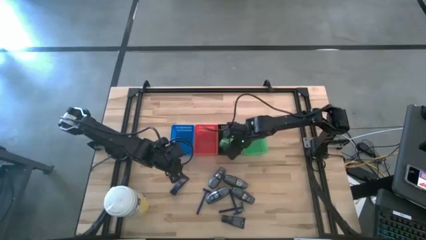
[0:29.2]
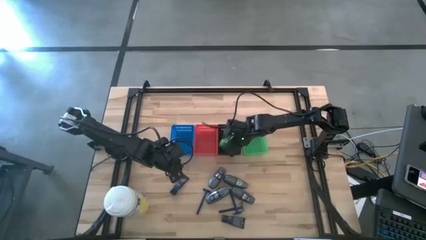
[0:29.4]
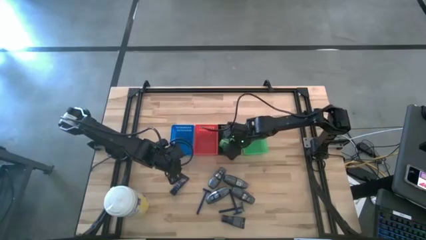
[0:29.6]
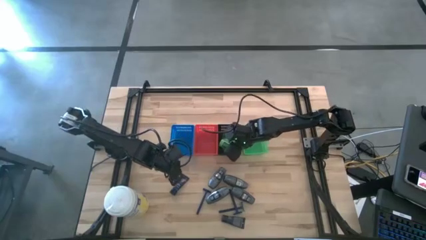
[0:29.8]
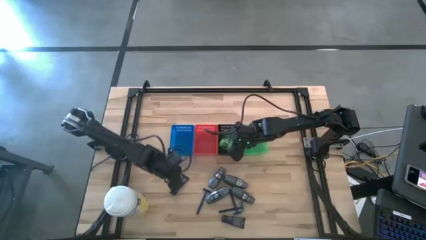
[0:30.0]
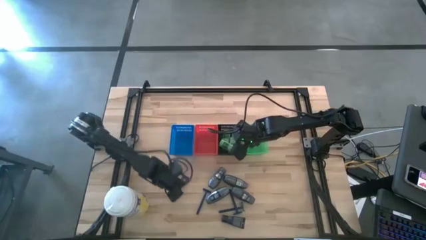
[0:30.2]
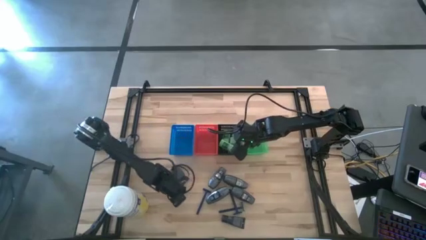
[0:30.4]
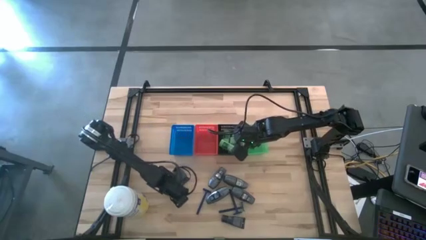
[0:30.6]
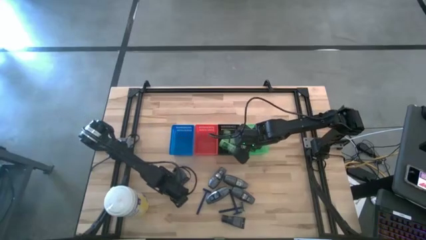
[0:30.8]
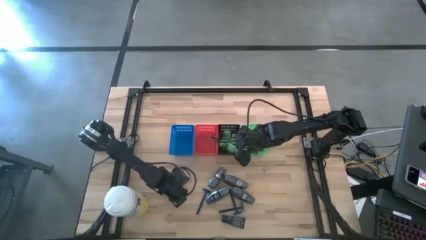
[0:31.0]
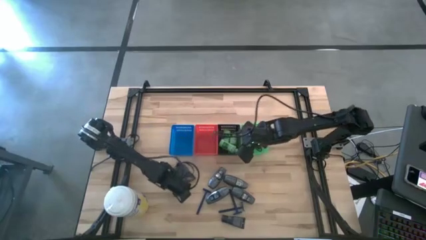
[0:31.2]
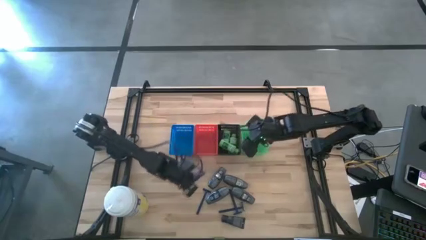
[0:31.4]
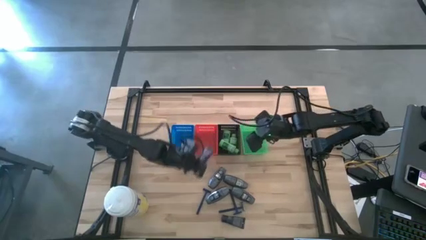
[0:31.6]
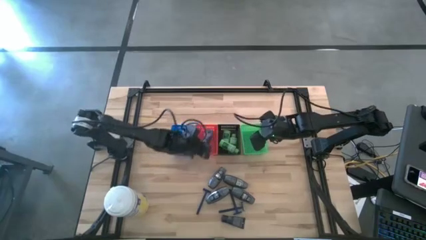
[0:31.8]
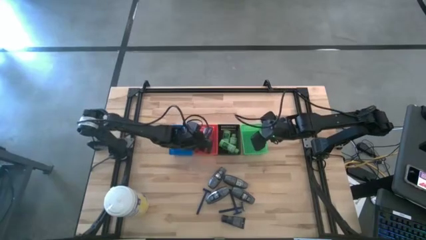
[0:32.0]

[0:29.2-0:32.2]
Task: Pick & Place Travel size toiletries
Put the shave cream into the red bin

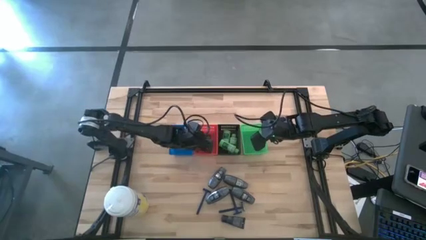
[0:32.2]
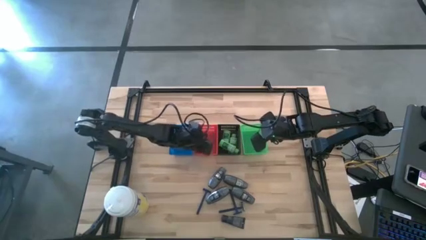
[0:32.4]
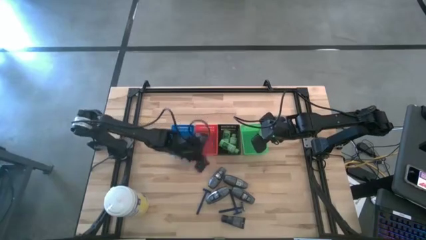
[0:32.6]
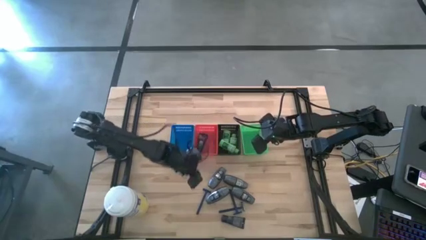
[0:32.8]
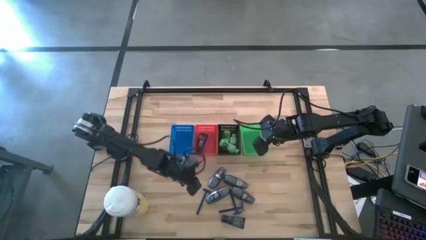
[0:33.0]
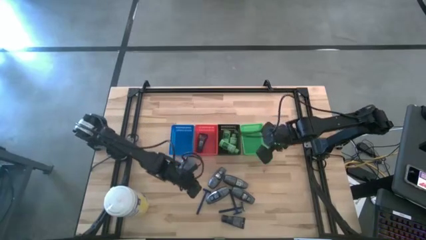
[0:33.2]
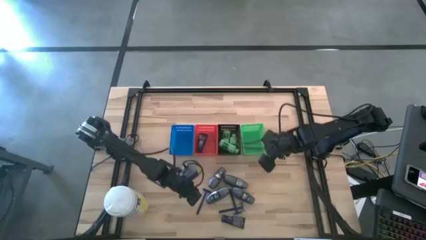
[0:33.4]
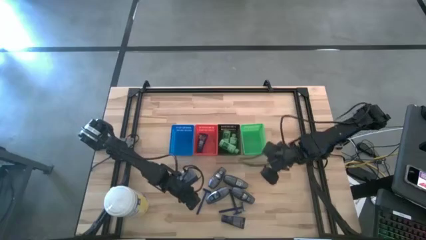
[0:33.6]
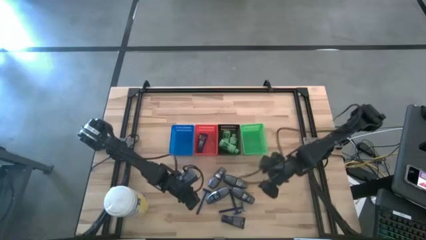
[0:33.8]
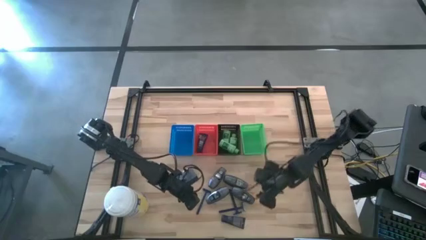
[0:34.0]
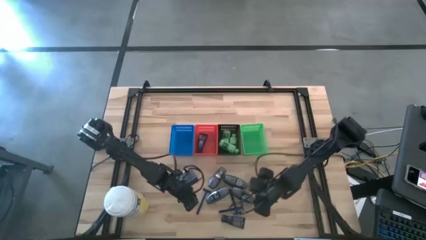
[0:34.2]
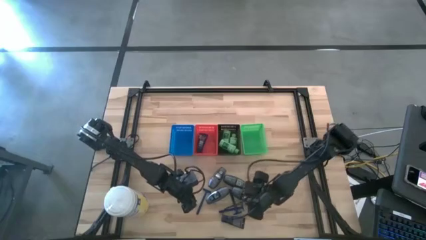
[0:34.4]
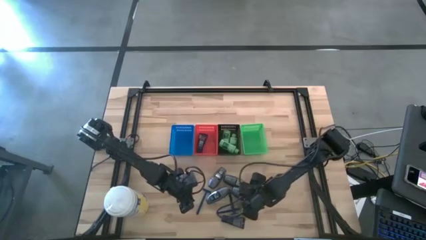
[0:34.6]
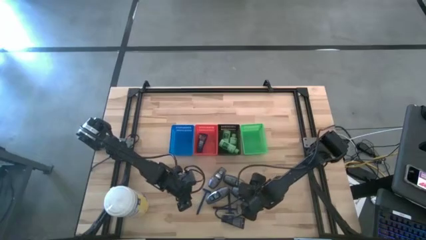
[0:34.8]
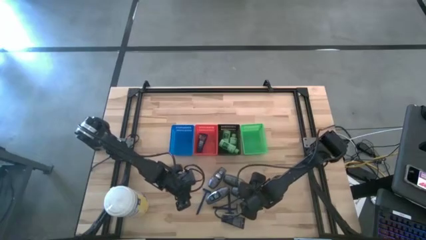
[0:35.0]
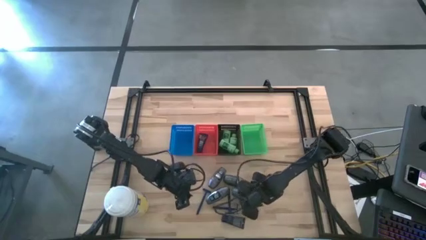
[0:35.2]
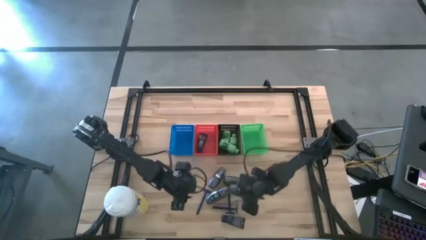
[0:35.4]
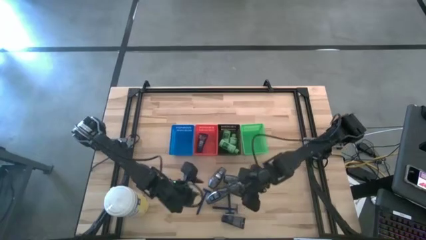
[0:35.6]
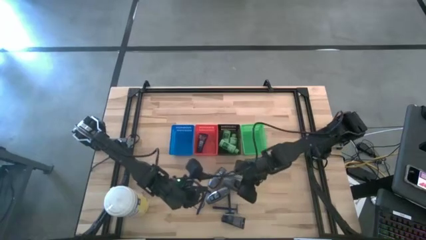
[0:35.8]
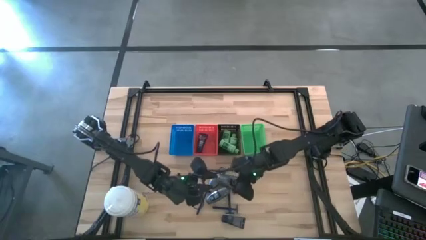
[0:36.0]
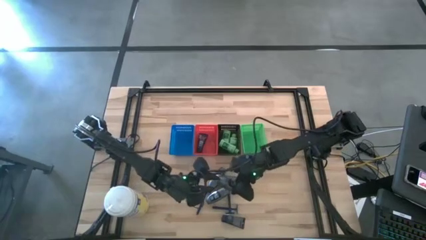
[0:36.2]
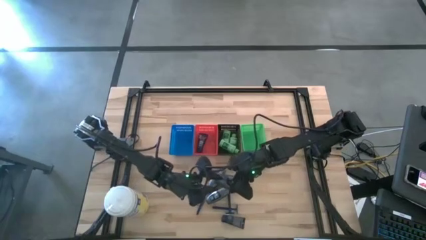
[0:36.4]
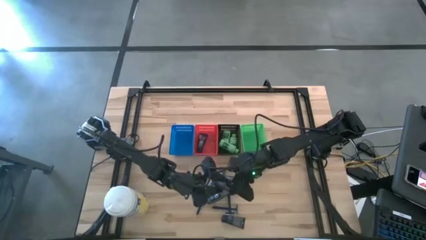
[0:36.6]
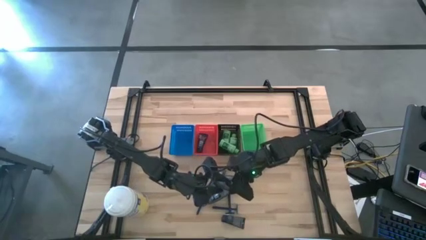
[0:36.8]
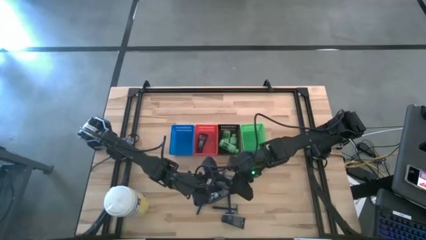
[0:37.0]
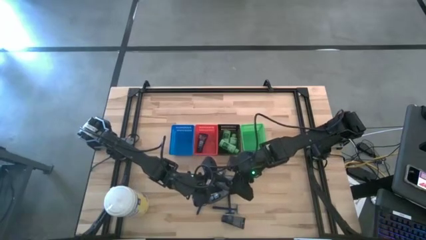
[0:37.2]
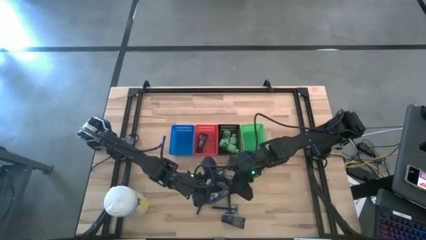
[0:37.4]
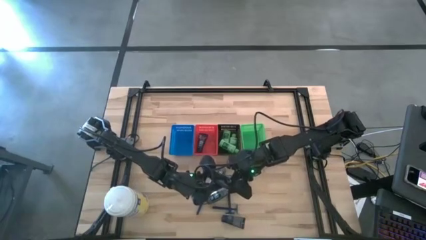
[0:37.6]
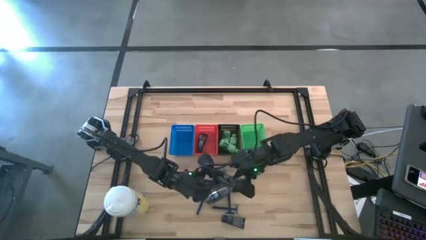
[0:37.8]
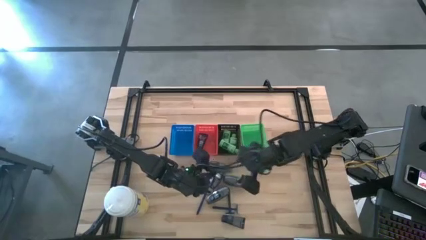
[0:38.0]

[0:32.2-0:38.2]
Put the deodorant into the blue bin

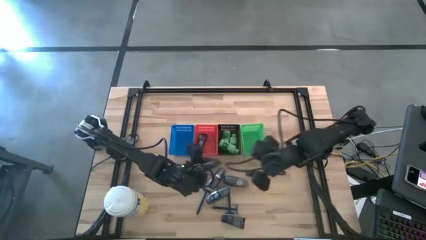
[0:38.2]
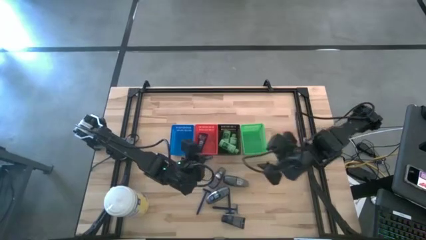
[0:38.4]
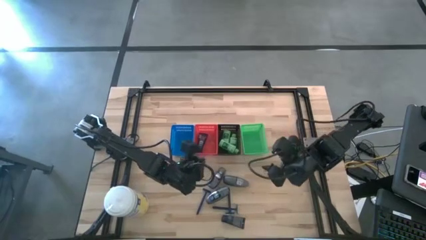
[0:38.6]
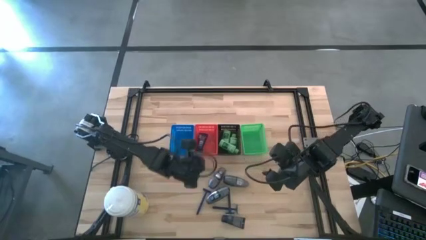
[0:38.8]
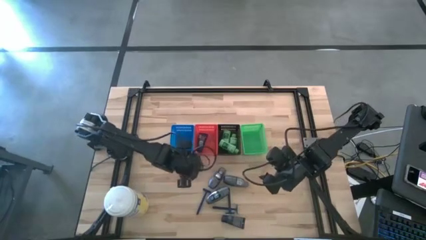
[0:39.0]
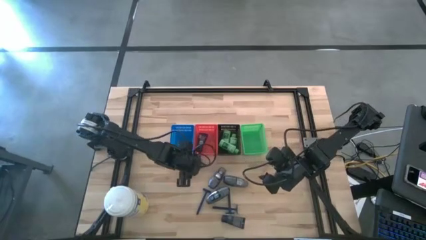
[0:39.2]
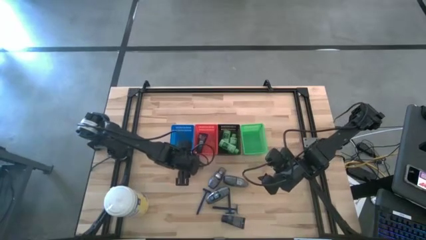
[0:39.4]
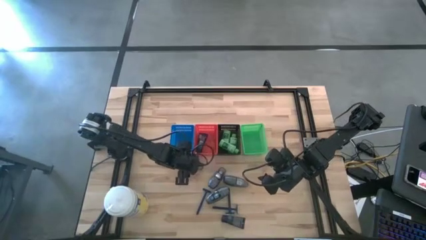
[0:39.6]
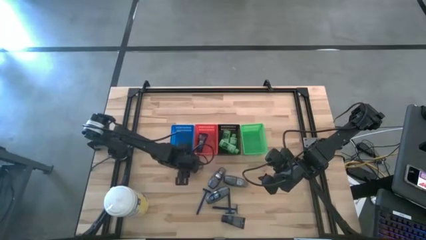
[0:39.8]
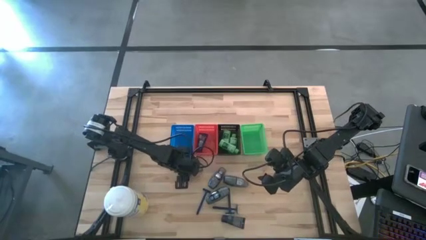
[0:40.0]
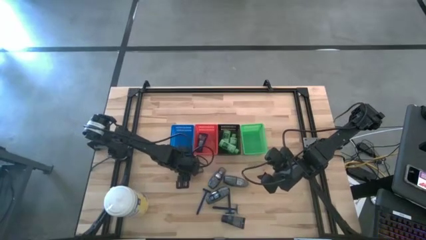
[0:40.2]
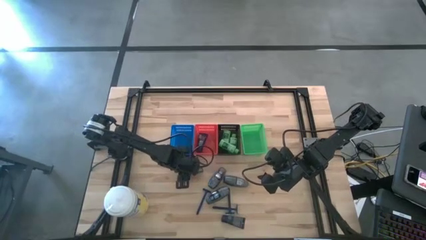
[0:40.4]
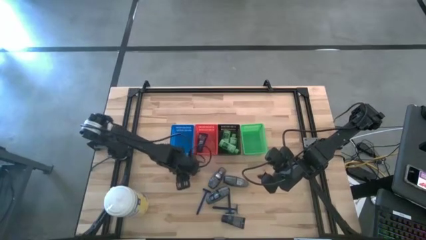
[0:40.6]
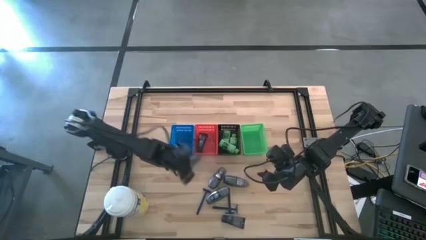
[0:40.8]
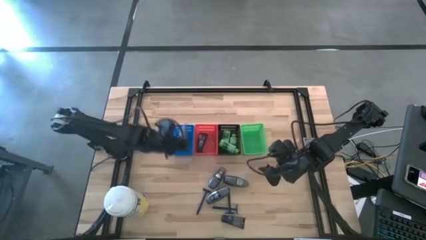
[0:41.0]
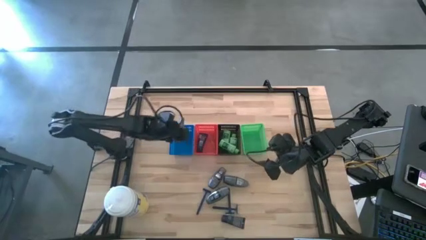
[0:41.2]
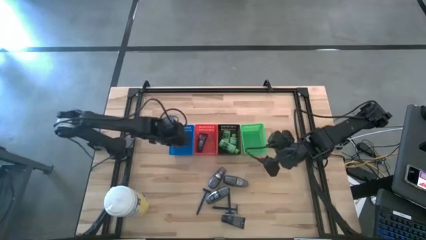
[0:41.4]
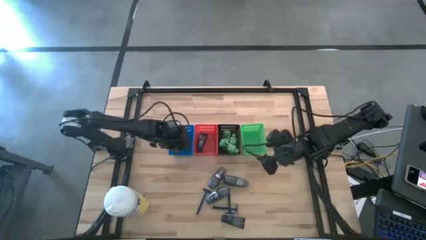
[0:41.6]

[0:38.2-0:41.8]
Put the deodorant into the blue bin

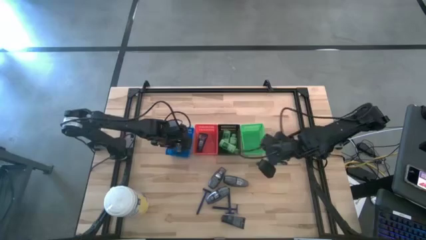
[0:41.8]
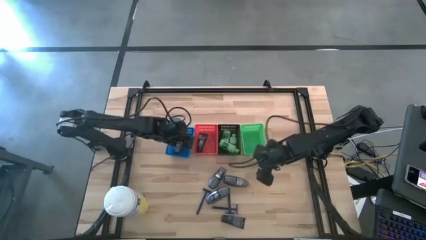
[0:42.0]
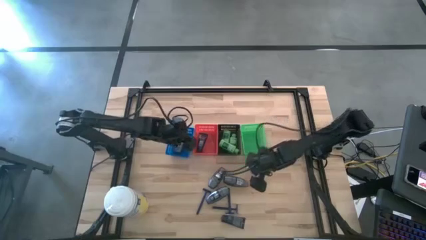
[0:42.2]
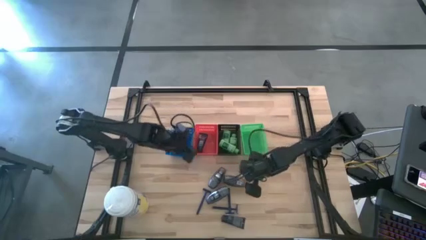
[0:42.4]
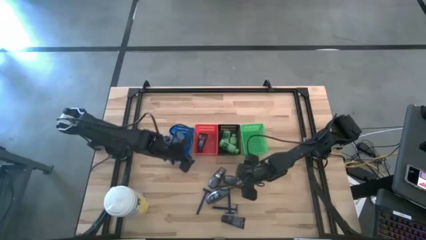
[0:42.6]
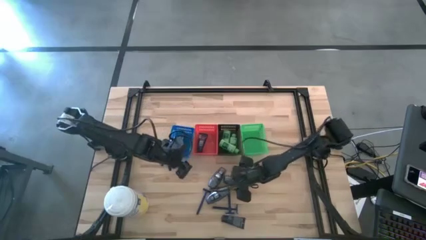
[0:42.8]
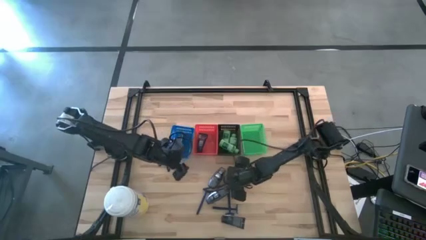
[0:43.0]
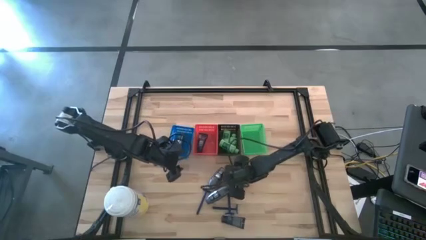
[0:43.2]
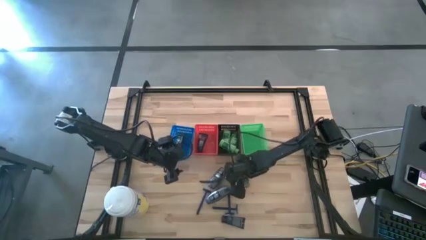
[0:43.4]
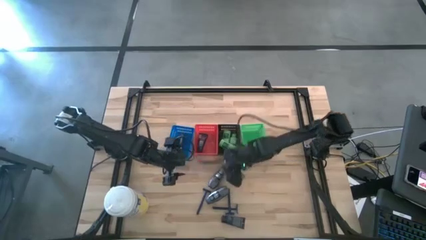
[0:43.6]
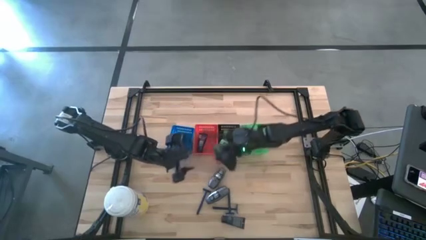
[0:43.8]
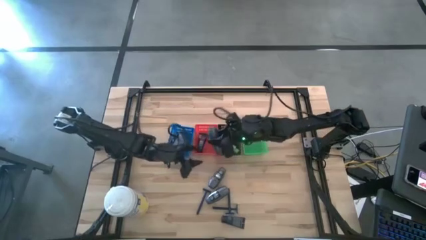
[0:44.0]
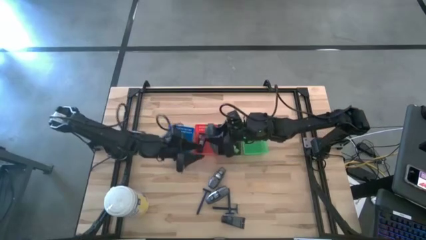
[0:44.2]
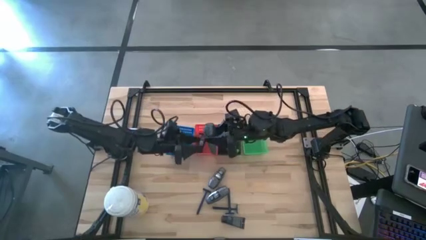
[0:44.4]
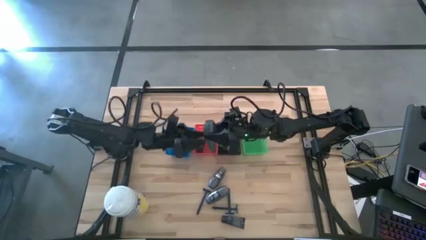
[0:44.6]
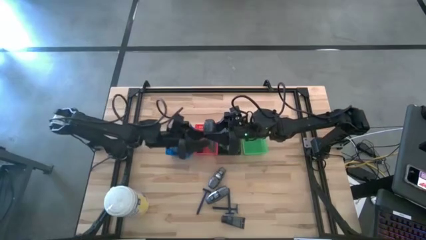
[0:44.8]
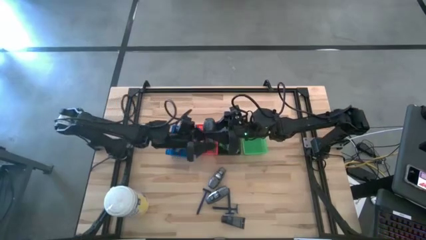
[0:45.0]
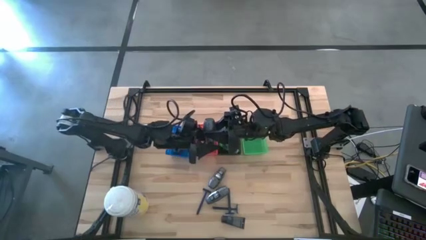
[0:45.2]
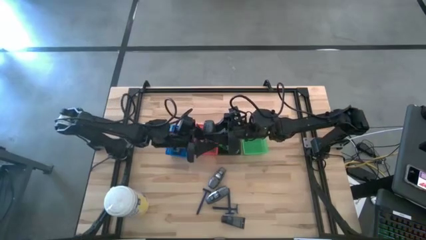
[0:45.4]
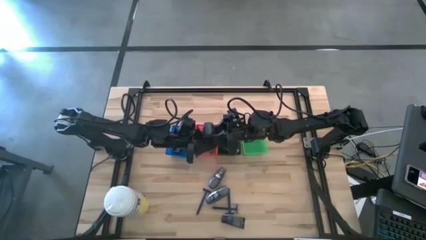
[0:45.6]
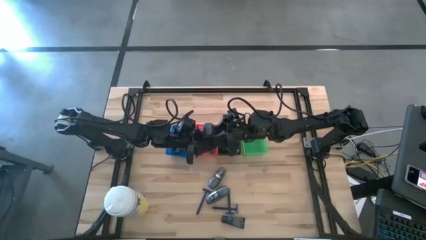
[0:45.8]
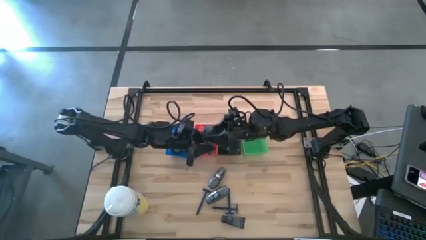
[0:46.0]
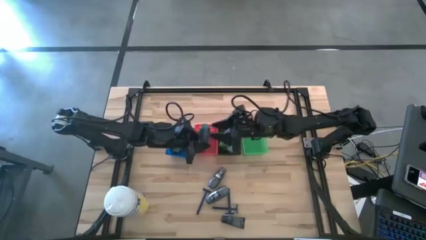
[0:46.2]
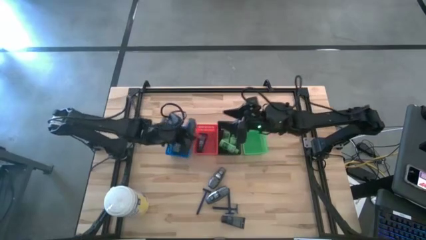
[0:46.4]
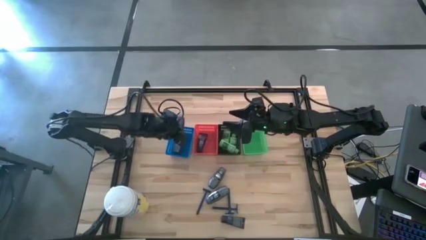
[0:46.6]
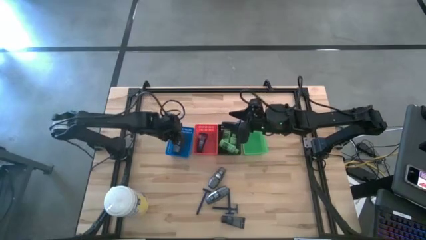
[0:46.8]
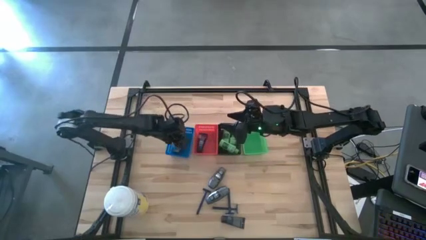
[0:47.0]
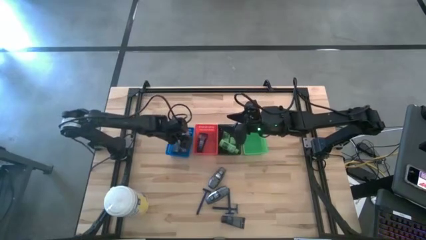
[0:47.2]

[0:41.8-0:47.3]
Put the deodorant into the blue bin
